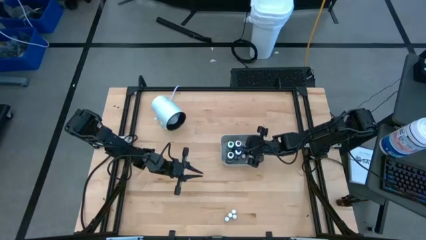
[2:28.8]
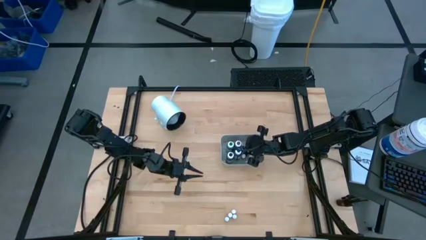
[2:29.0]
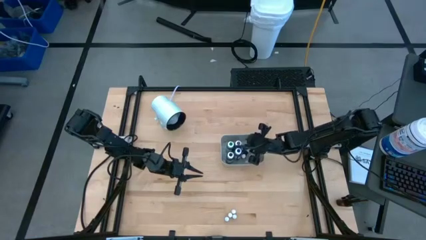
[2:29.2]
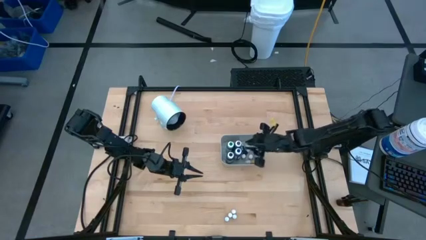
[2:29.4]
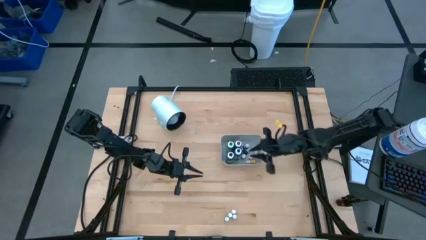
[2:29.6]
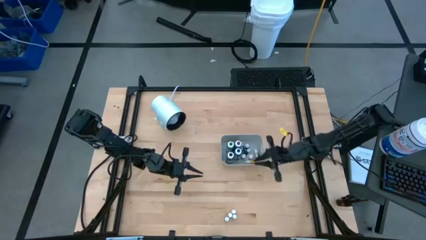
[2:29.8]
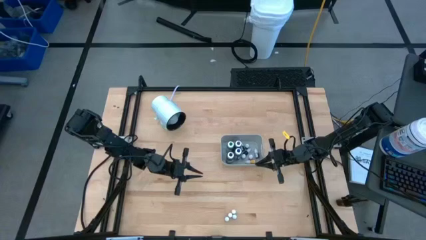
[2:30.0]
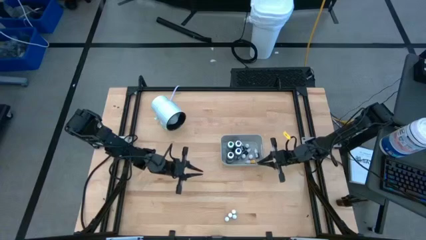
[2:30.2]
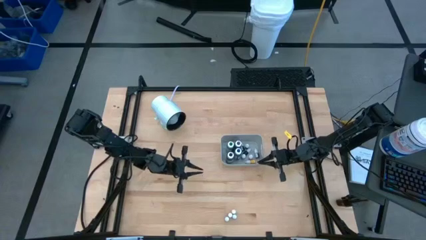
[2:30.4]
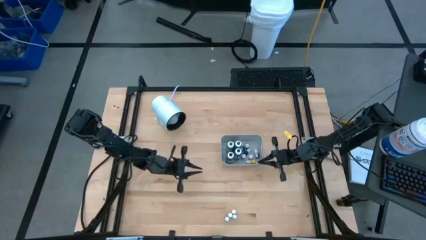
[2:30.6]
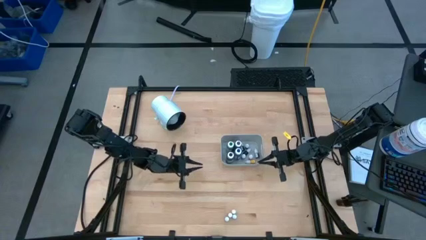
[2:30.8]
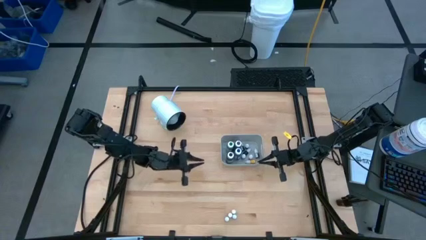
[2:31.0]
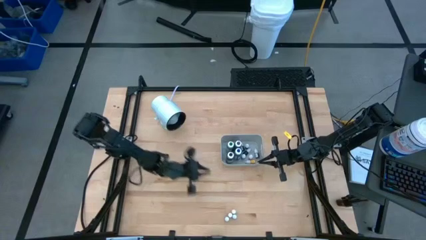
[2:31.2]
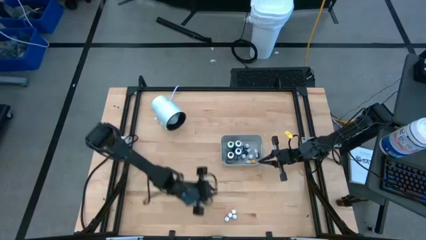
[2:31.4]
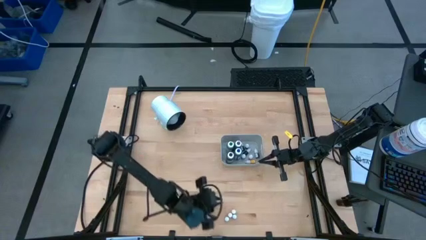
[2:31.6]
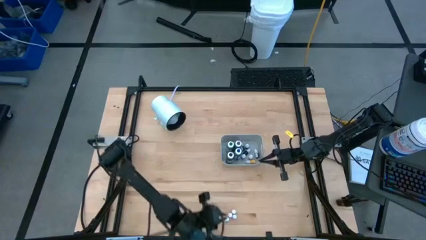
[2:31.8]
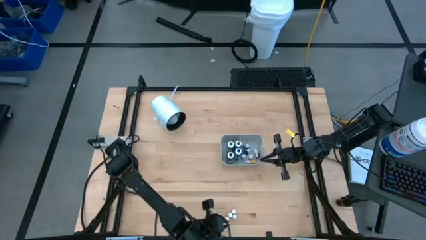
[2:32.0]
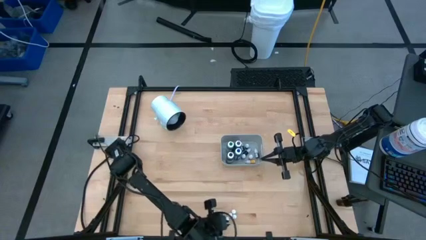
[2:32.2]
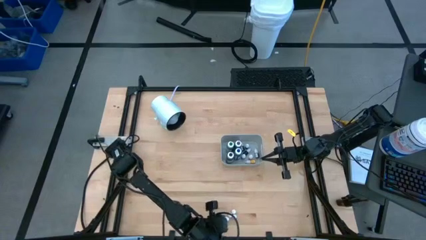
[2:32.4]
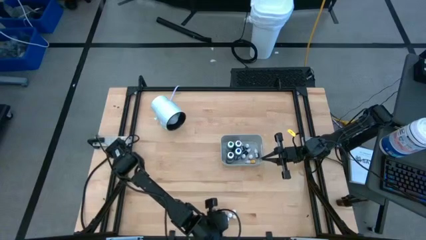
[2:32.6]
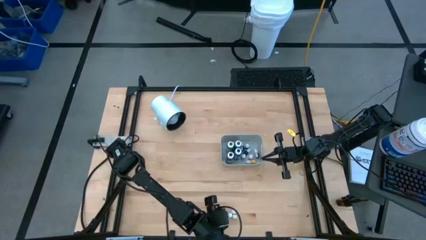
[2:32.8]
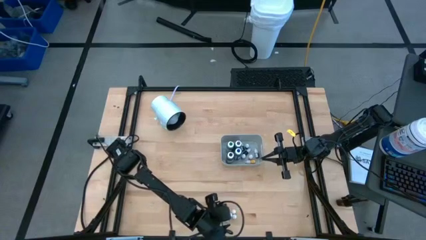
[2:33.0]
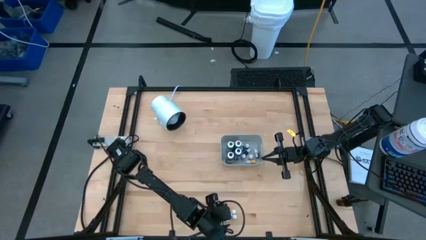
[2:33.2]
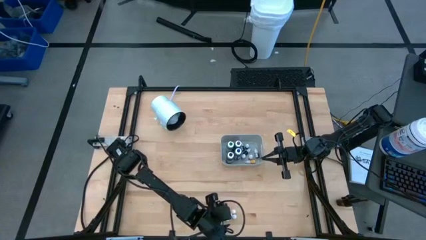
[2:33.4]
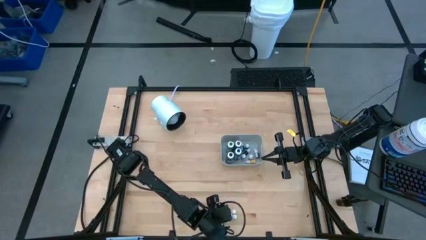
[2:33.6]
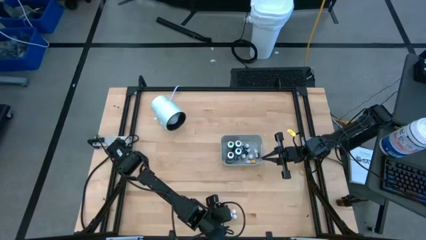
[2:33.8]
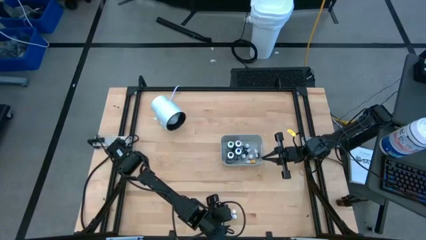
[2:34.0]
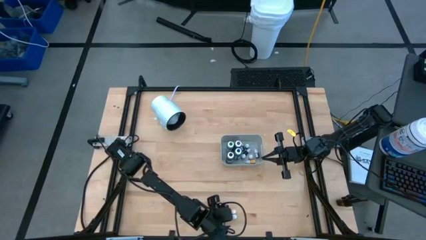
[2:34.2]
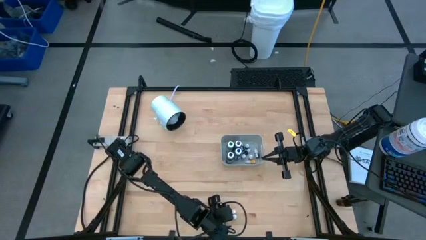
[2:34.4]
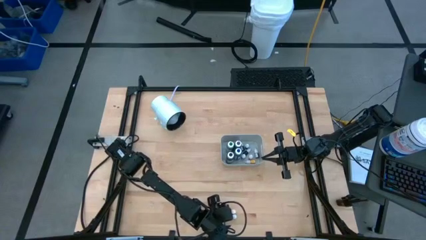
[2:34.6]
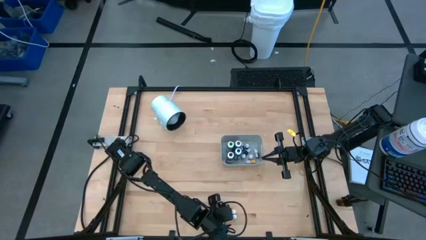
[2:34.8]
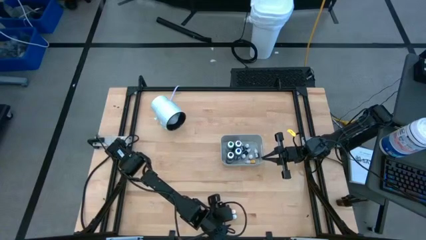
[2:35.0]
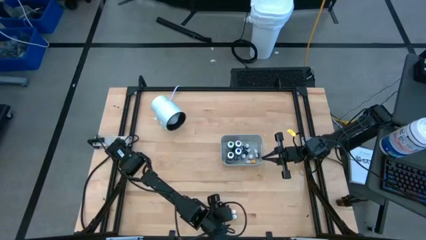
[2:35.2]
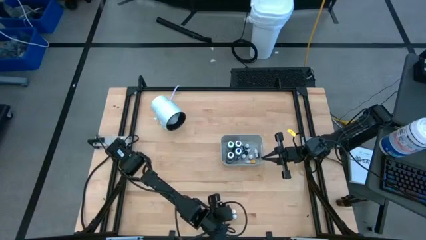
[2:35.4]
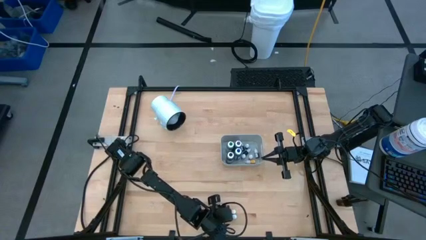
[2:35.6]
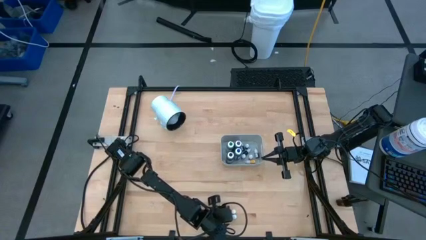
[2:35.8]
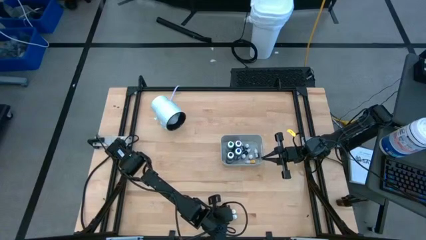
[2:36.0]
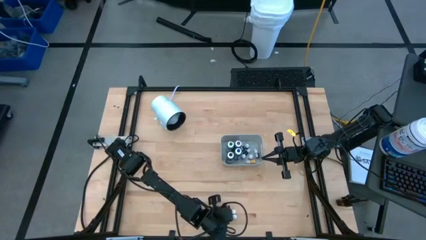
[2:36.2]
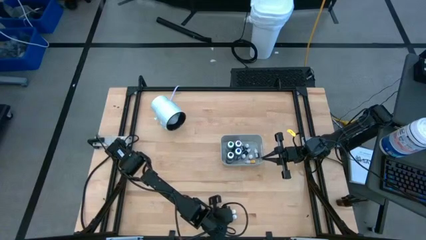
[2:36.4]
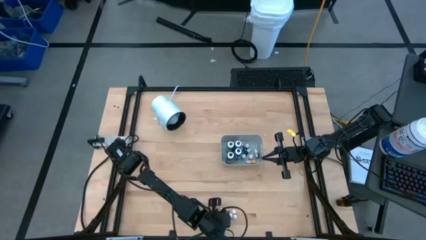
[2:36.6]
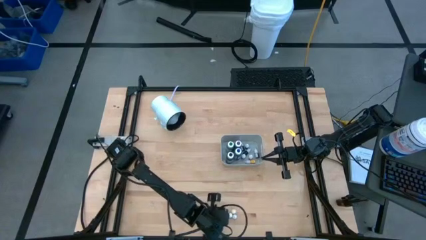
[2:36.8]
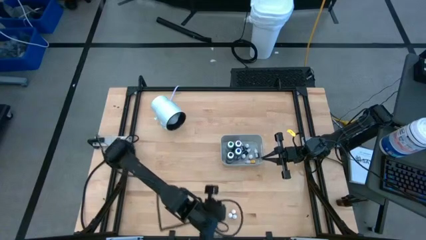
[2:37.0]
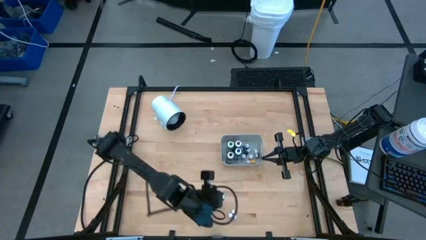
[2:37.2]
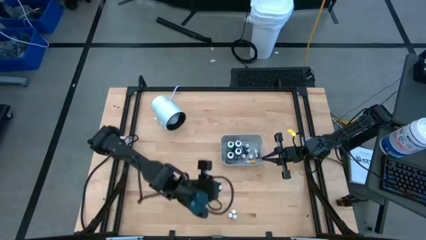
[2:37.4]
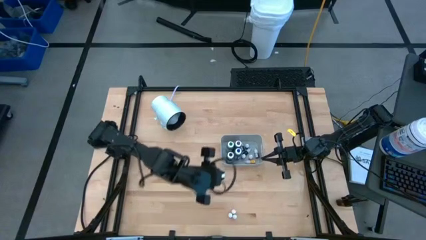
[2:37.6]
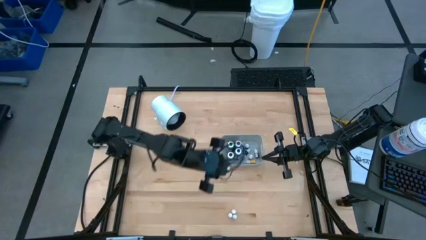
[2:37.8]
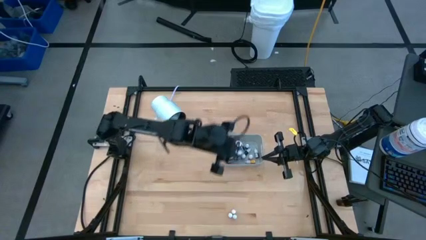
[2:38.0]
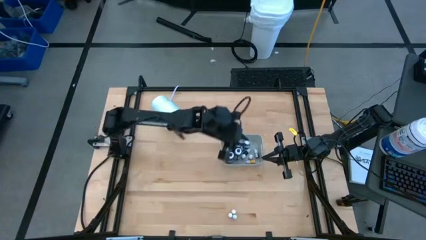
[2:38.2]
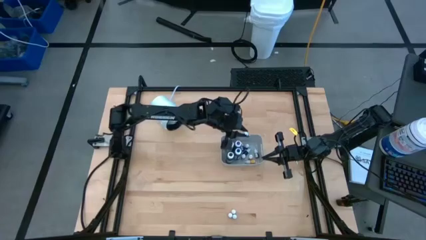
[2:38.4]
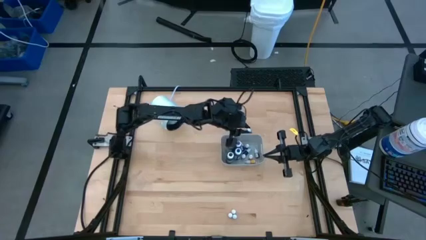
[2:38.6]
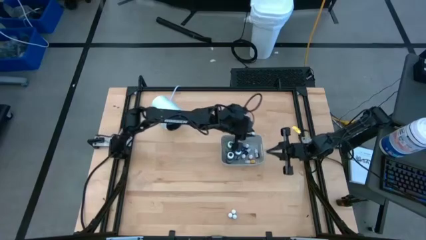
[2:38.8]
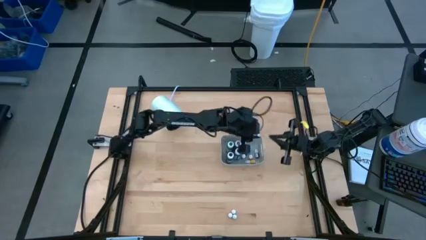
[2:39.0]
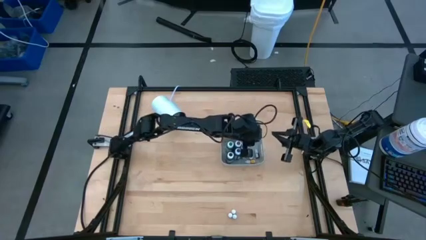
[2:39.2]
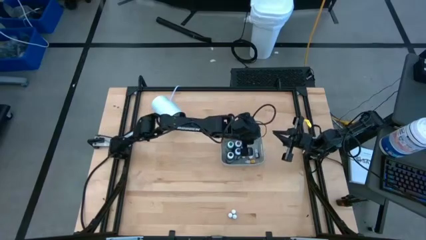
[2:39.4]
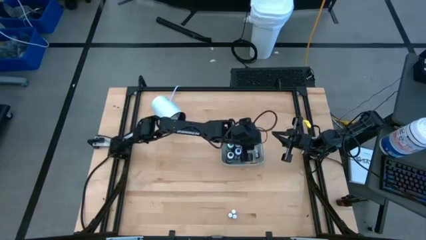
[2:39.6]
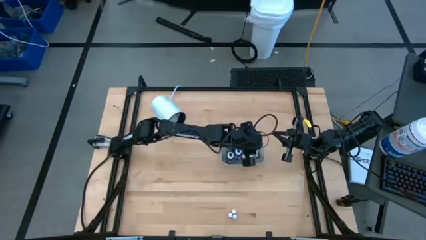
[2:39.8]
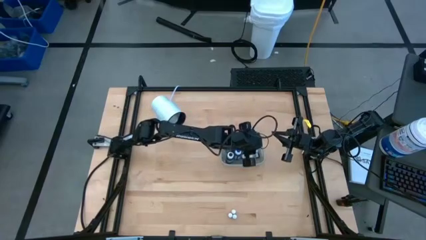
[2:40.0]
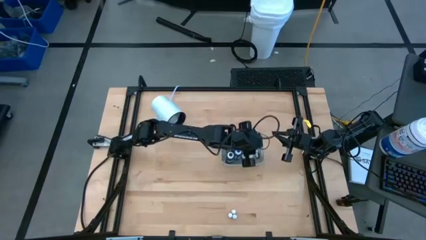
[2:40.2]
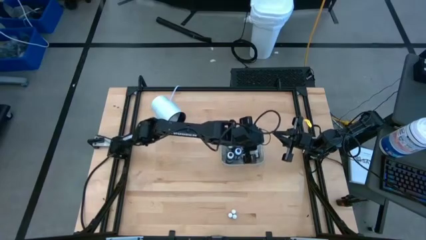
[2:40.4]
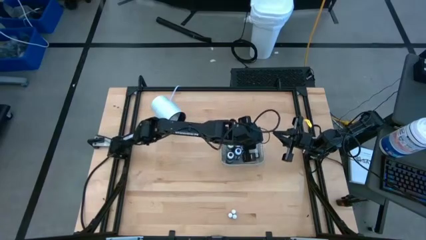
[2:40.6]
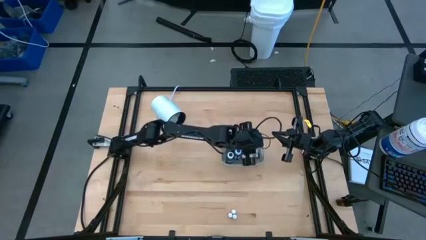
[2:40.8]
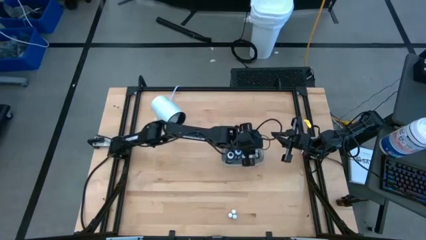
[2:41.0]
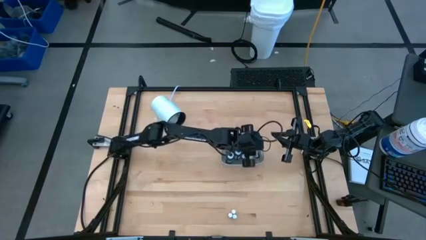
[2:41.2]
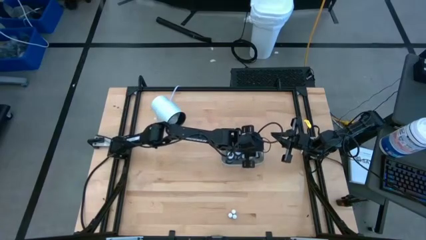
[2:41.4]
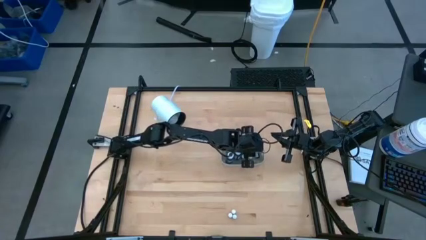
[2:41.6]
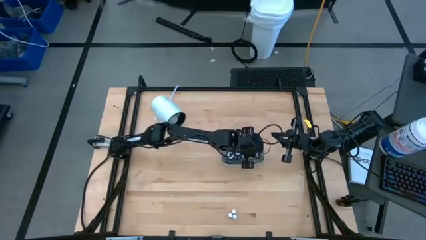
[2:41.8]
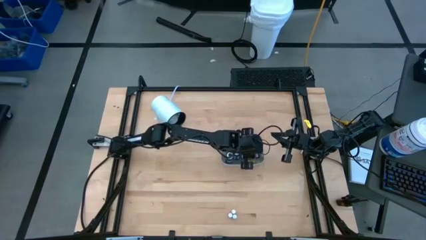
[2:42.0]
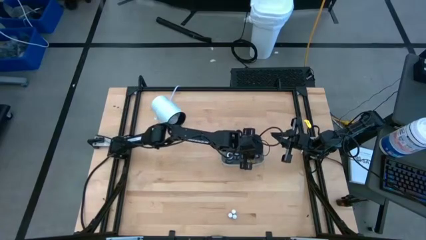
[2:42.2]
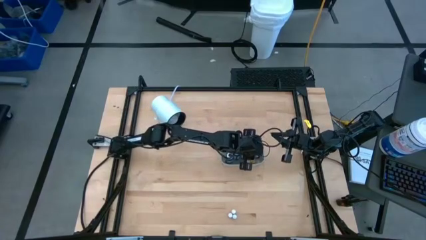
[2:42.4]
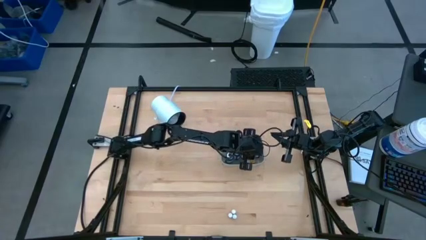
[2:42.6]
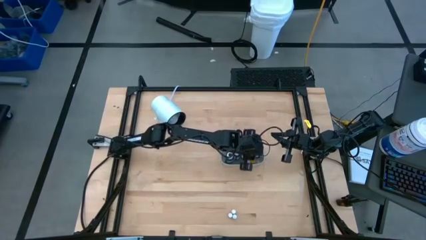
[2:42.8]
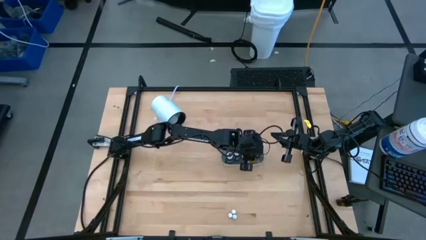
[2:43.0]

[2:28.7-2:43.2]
Task: Pick & Place food coloring
Put the small blue food coloring bottle into the gray bin

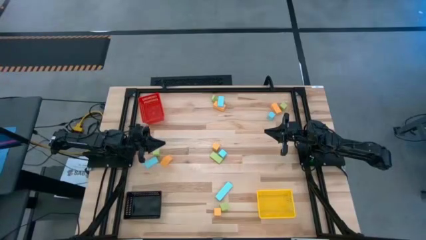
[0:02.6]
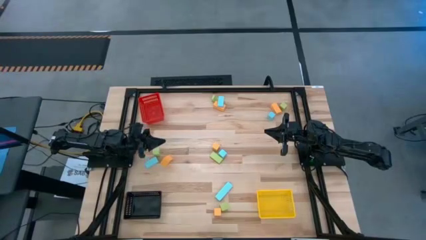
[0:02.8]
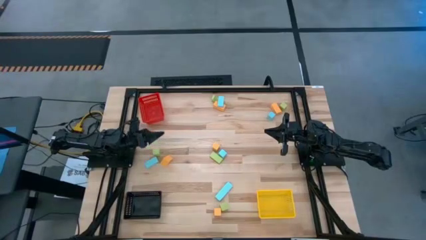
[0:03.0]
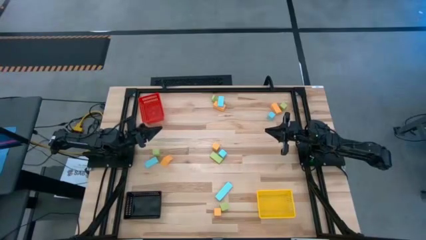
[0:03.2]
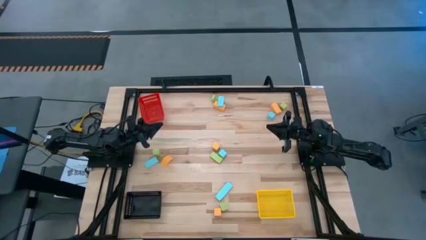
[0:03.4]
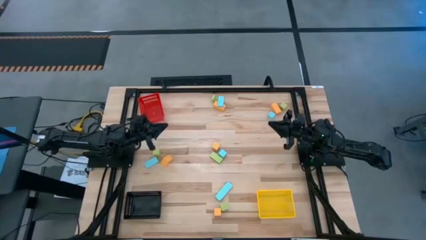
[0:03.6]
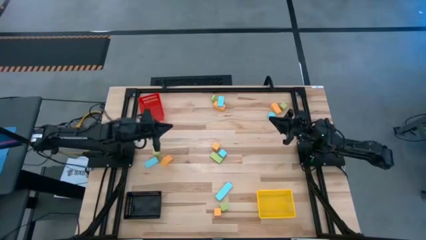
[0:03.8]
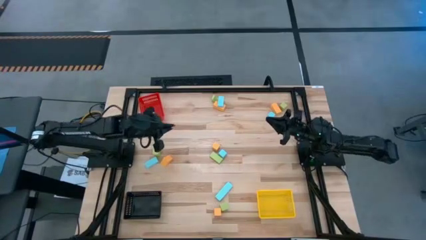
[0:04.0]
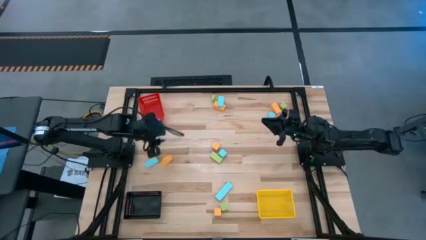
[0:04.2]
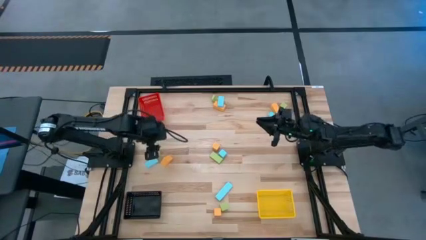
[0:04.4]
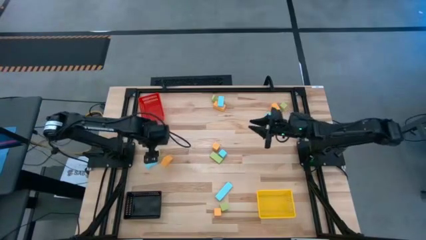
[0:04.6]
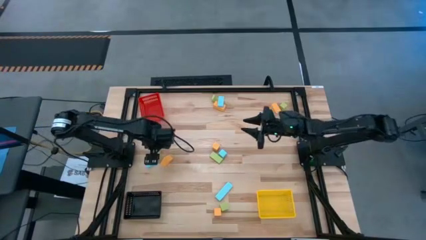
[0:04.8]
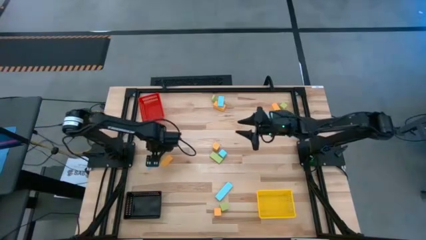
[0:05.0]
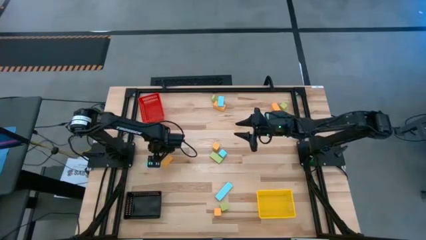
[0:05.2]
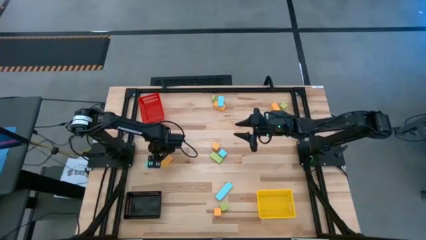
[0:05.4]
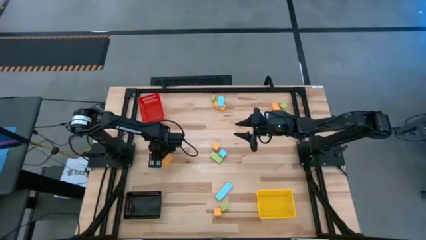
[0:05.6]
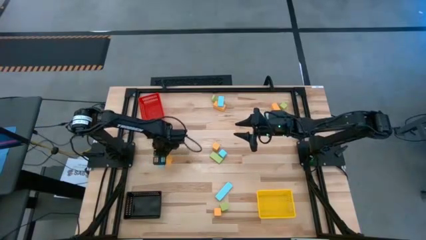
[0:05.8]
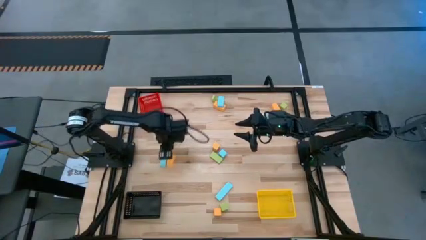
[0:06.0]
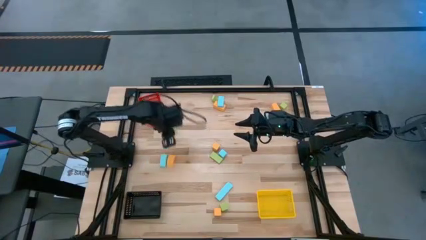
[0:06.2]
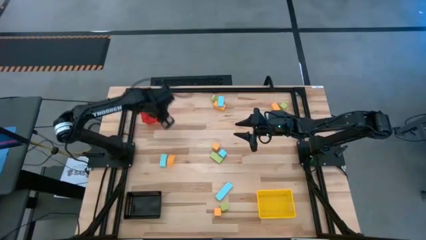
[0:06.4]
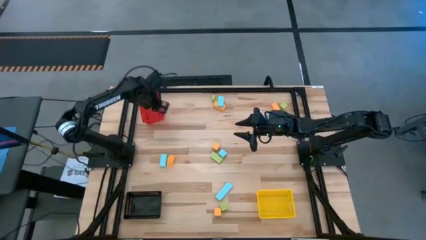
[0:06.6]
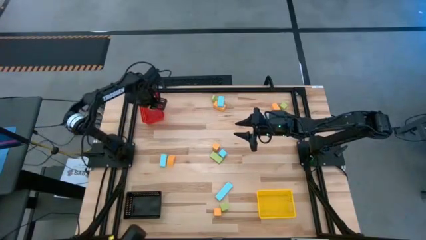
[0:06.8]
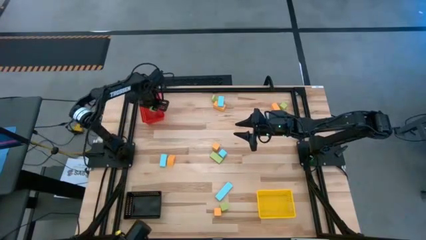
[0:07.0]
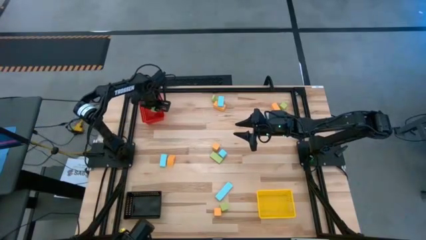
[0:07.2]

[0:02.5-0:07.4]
Task: Sort & place blocks by color
Put the green block into the red bin
